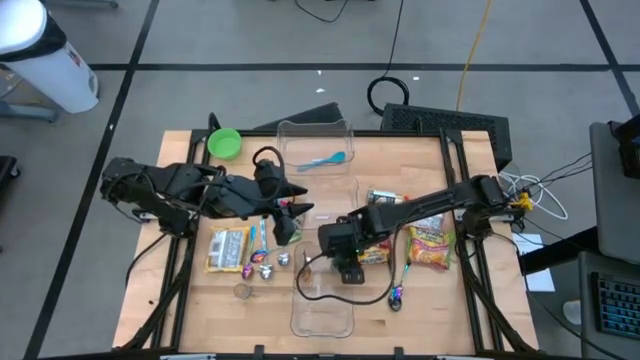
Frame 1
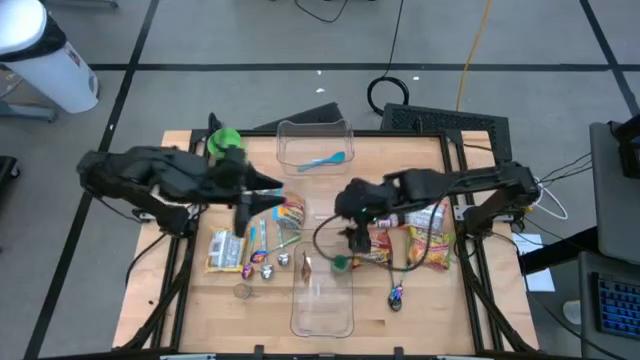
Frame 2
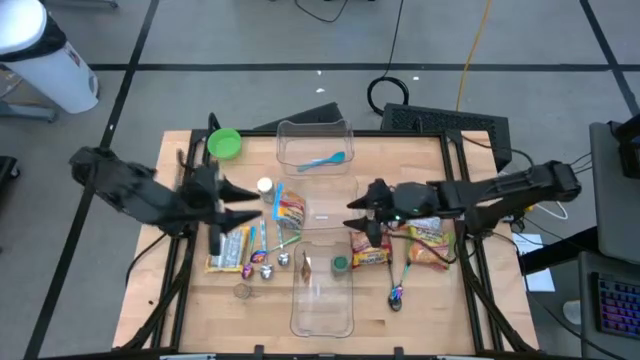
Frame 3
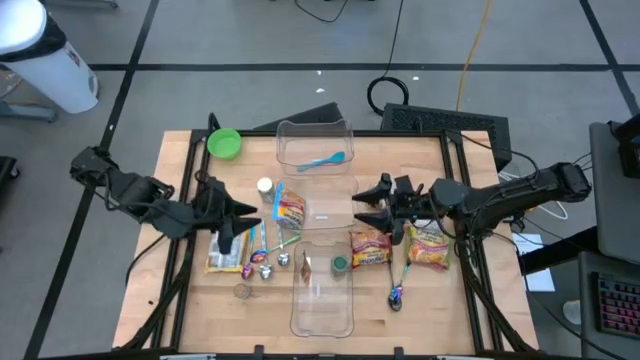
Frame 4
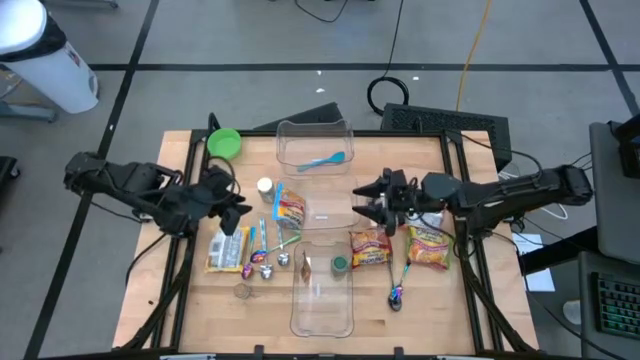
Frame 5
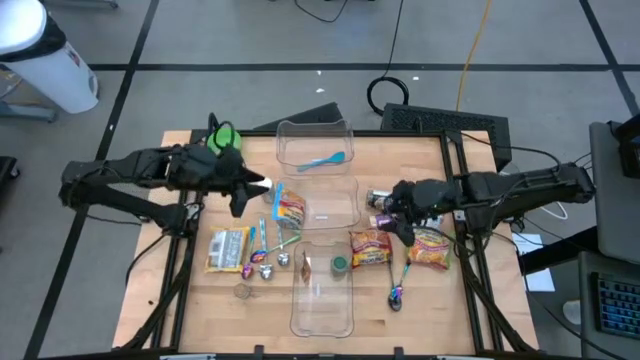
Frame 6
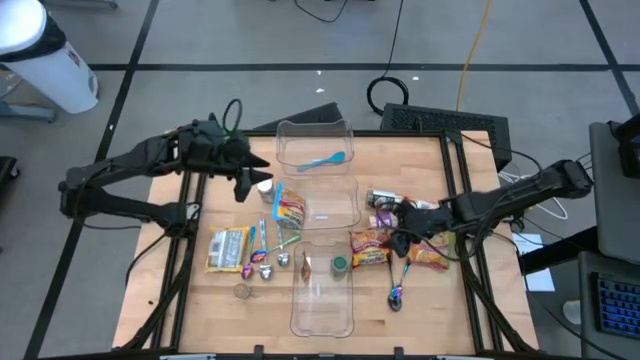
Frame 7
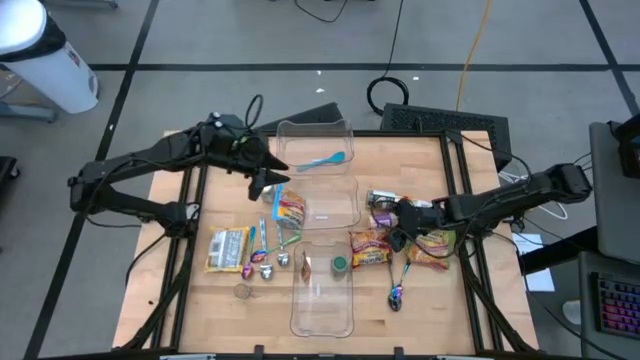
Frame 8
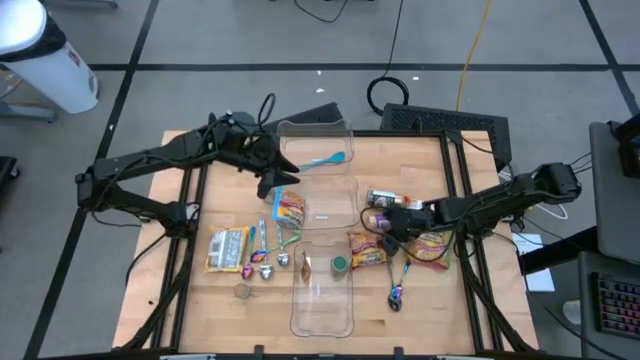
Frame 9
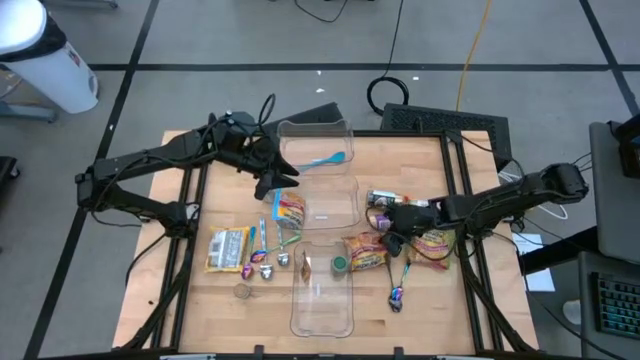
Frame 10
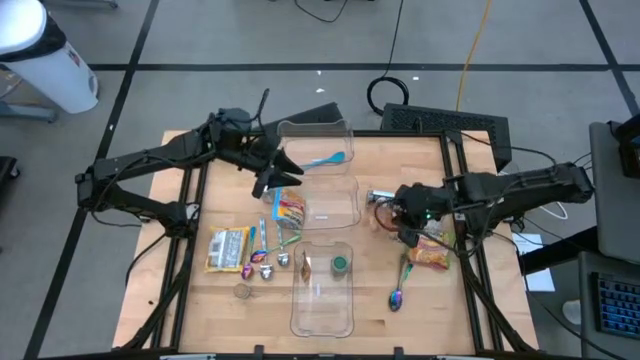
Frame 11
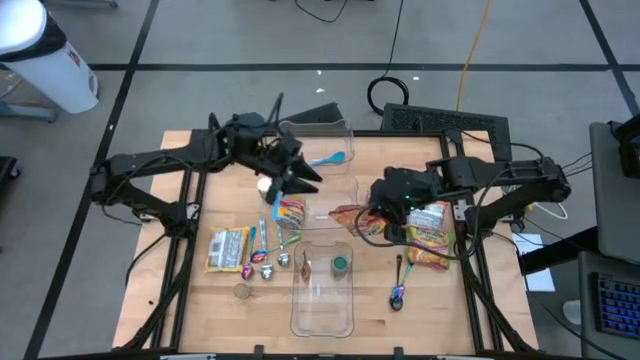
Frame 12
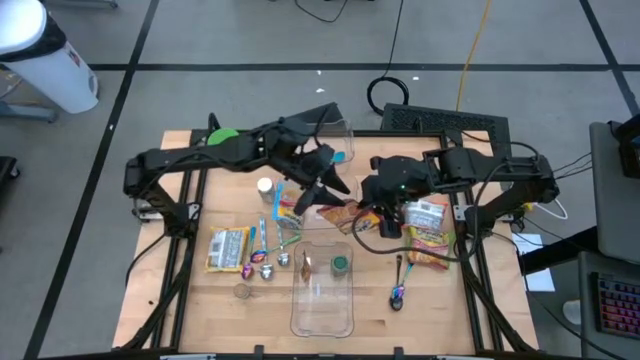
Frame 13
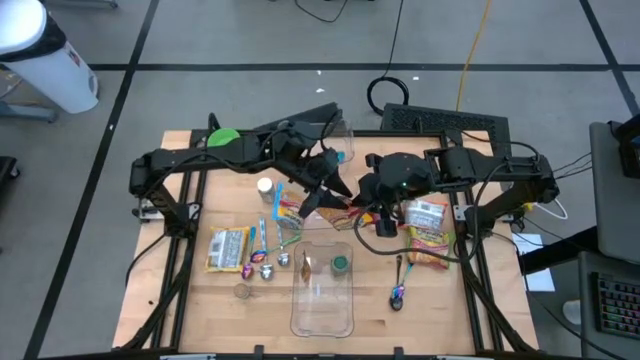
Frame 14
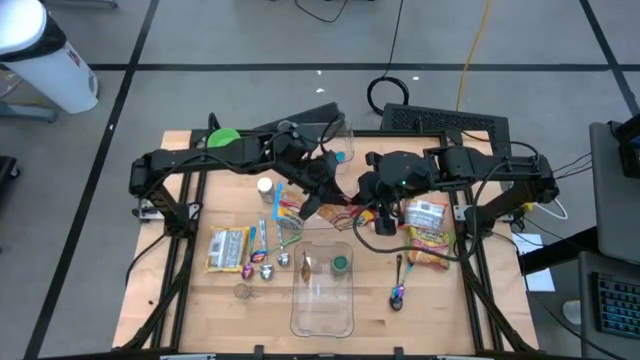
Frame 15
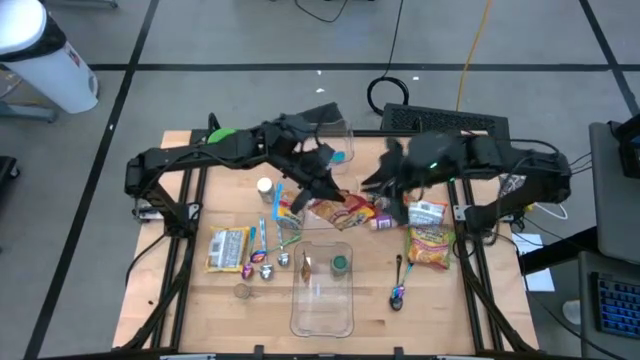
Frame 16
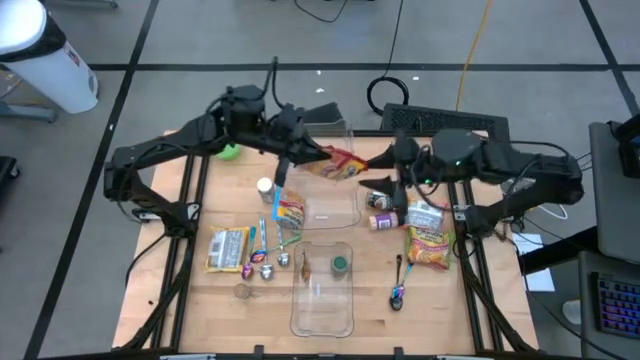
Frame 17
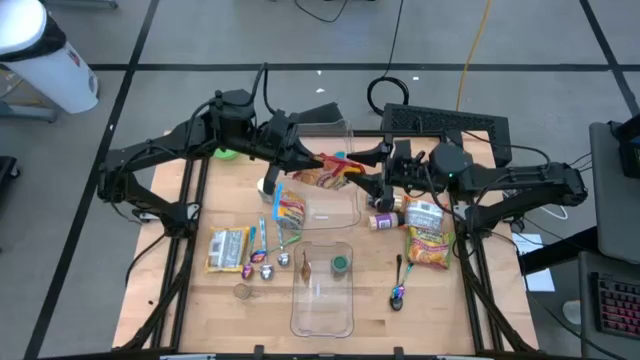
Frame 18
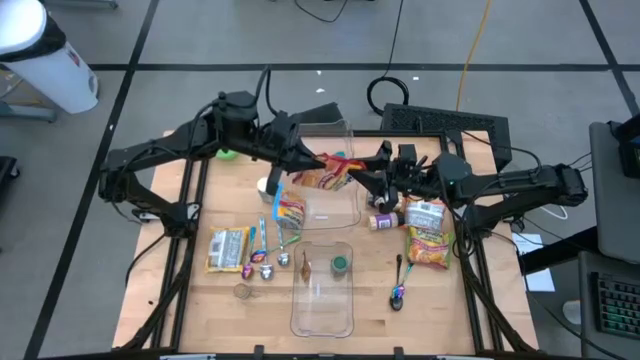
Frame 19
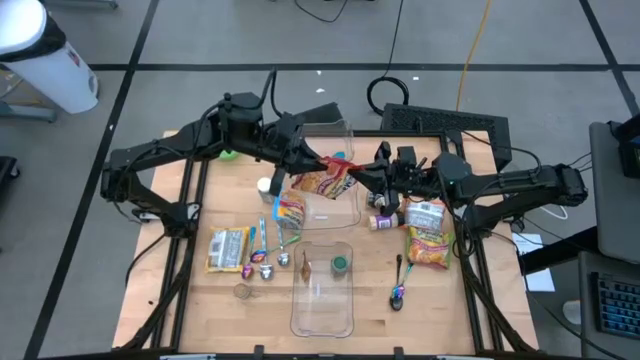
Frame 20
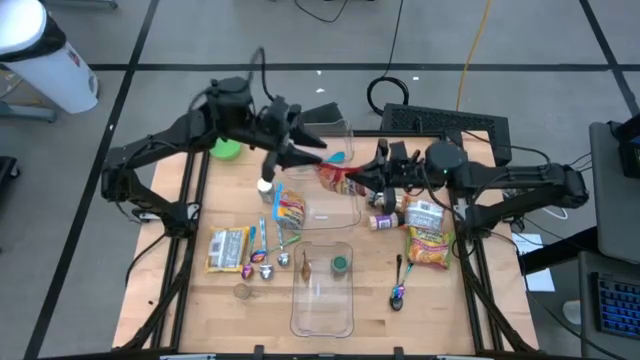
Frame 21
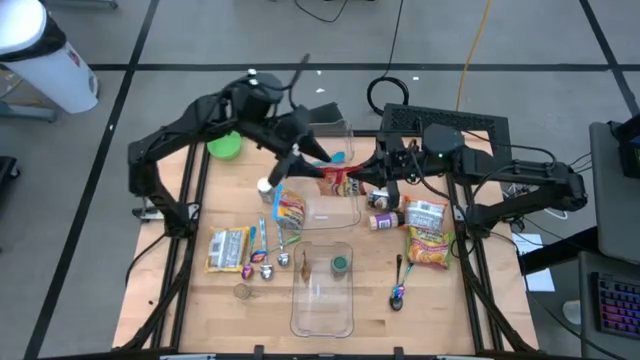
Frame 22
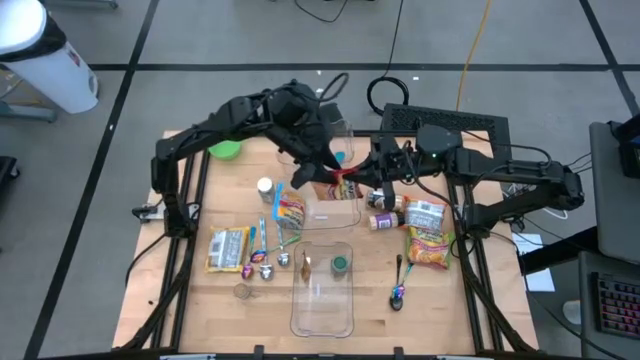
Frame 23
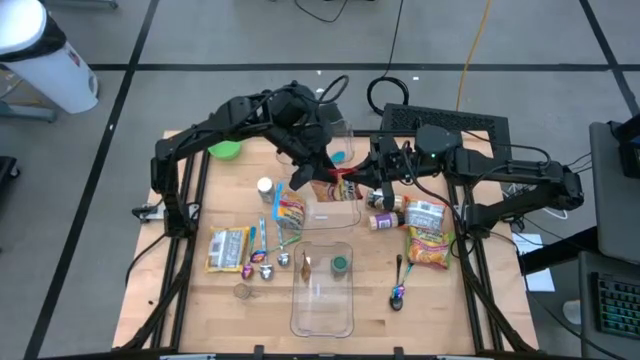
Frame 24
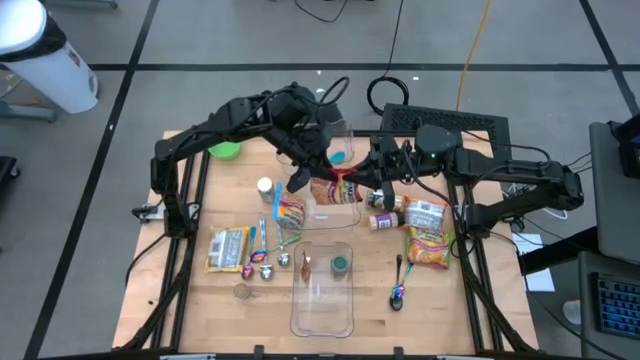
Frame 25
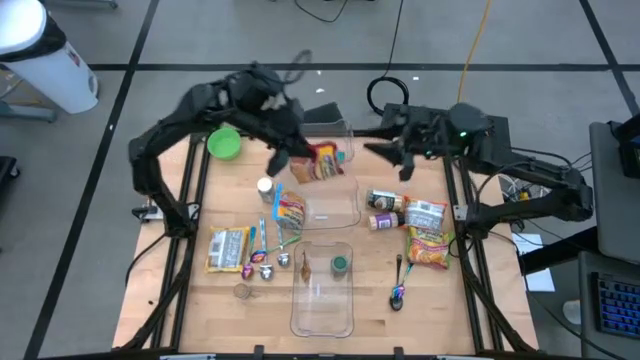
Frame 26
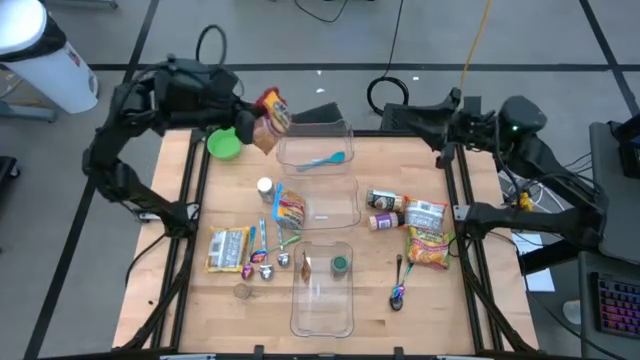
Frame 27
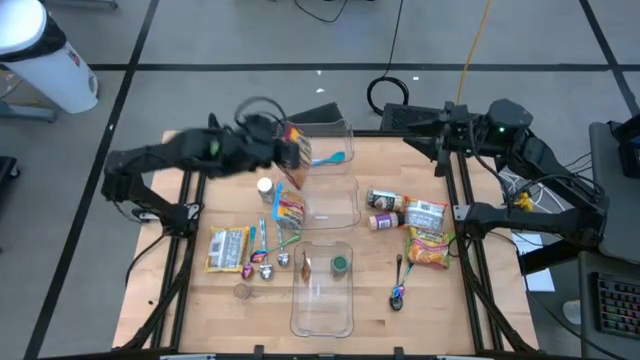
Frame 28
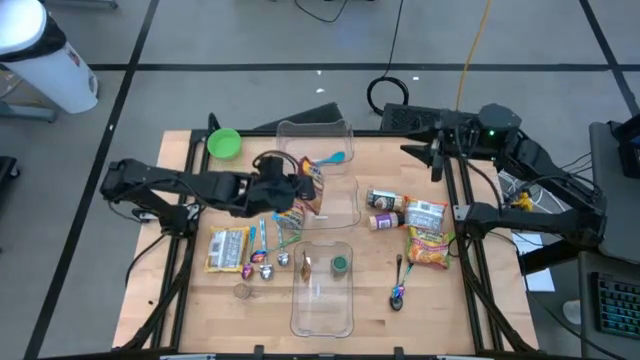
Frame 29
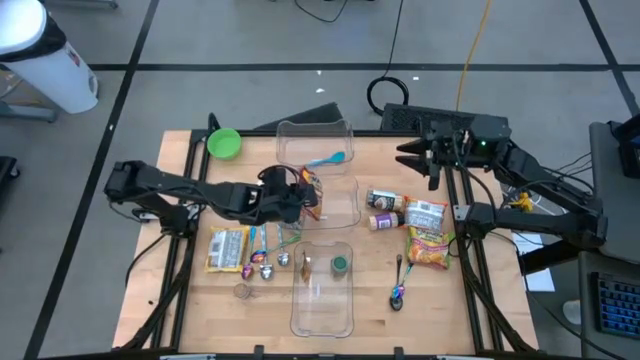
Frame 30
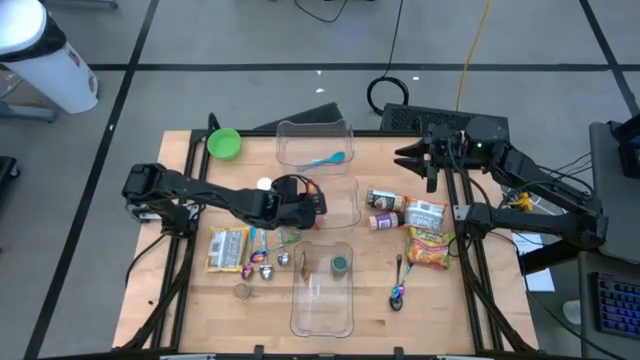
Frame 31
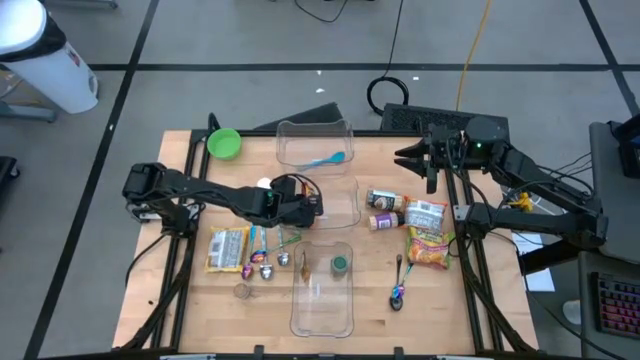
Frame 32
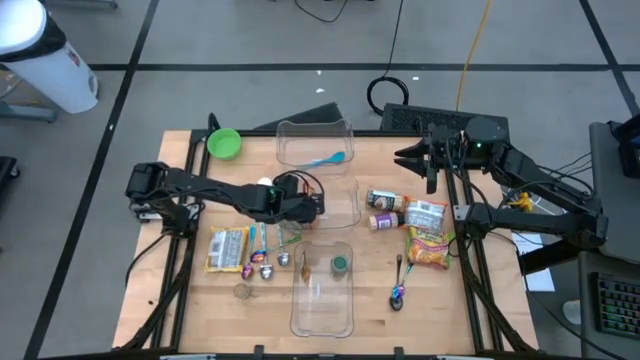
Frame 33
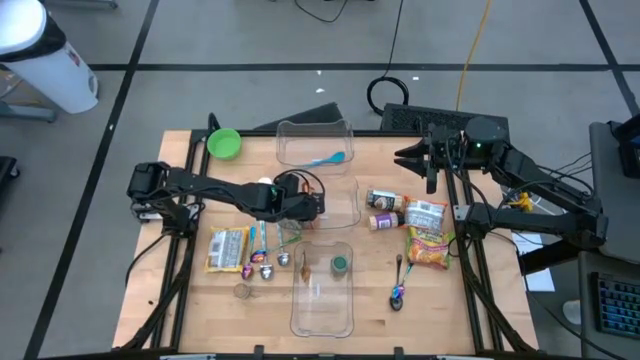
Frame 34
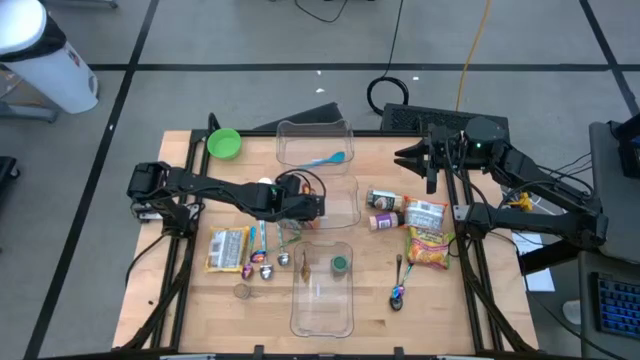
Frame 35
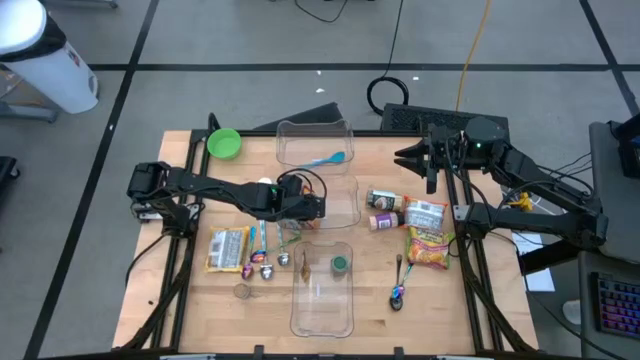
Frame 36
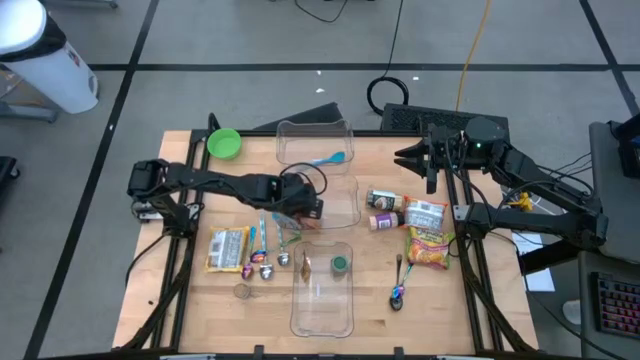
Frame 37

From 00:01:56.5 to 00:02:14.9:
Task: Pick & Place Food Item
Put the red noodle pack into the middle transparent bin

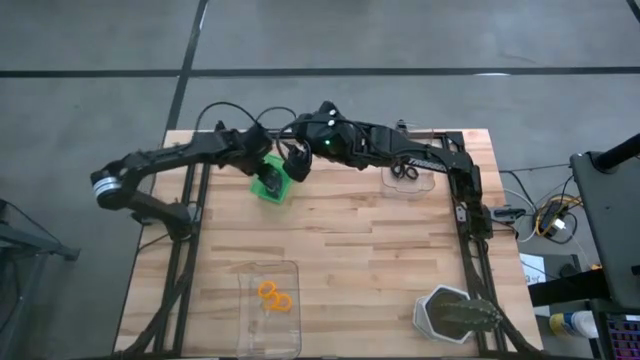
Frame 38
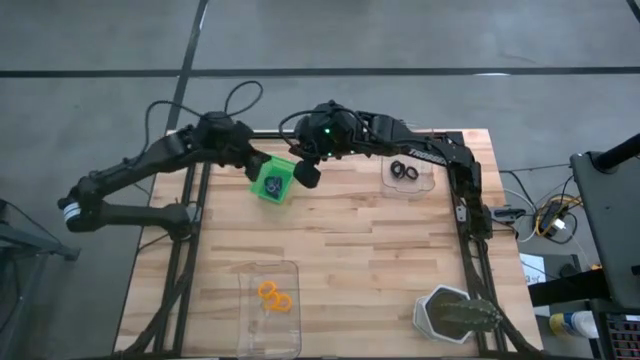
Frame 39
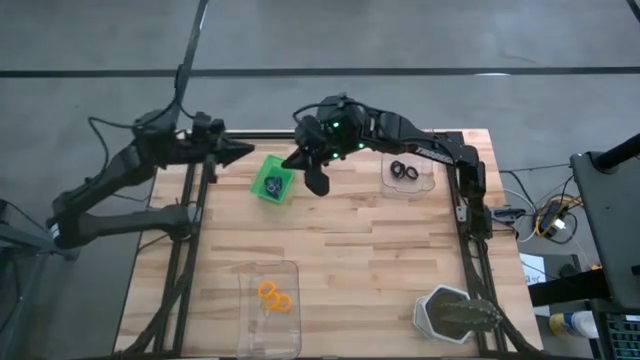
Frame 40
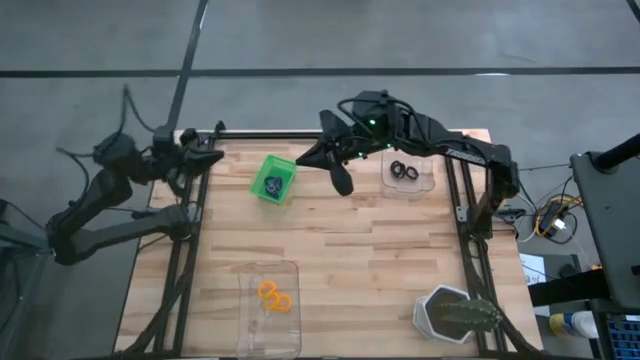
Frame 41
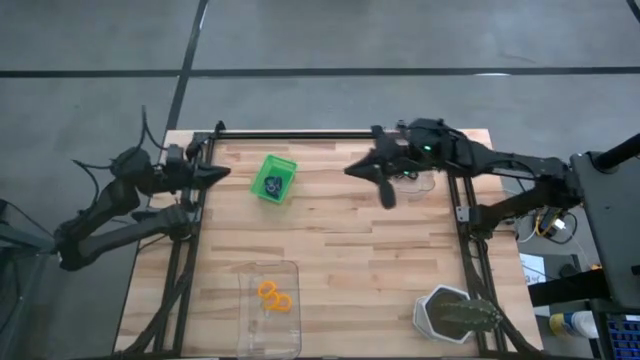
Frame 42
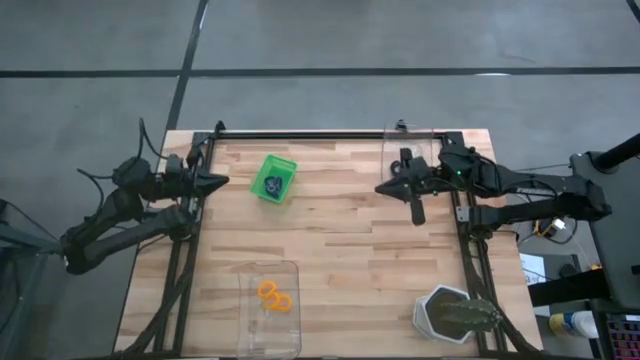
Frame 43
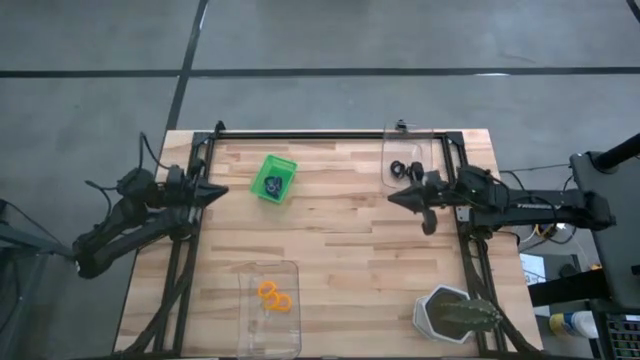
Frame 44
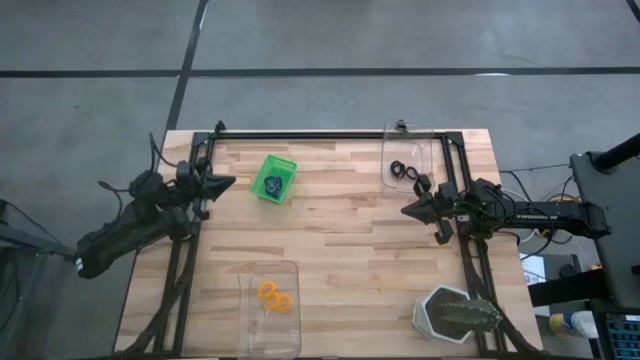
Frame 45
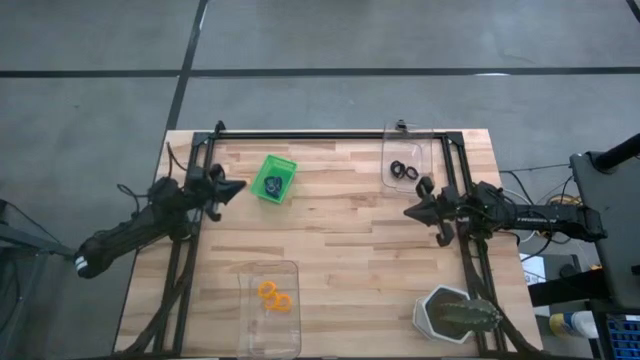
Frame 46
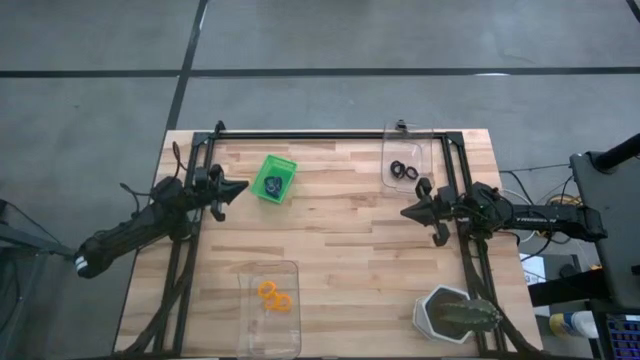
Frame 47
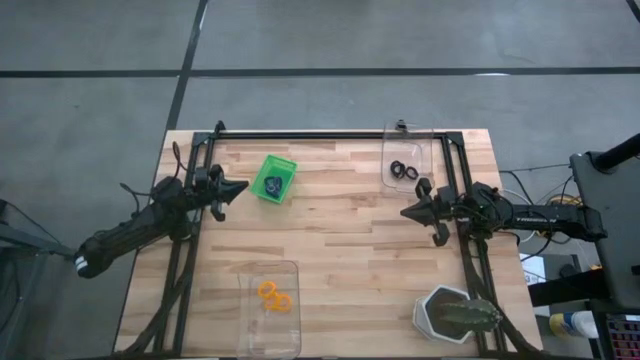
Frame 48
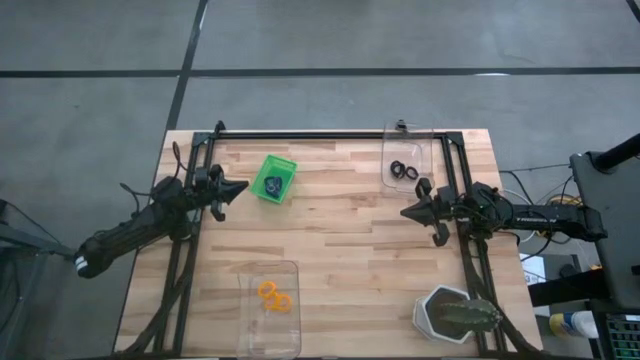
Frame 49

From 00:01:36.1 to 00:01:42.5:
Task: Sort spring keychains
Return to Home Position
